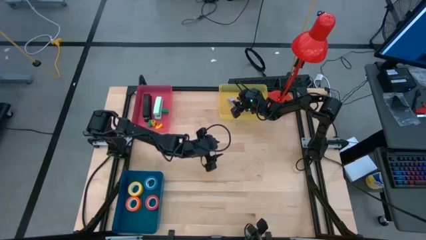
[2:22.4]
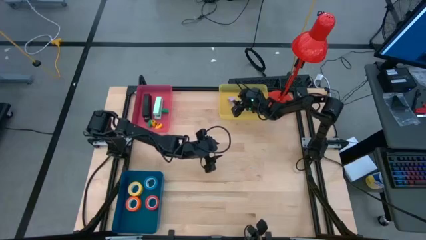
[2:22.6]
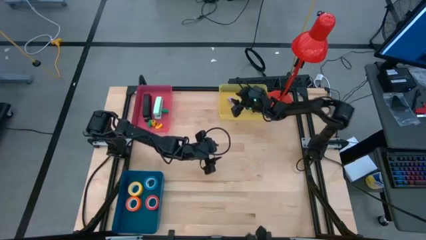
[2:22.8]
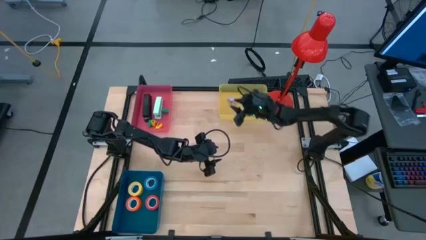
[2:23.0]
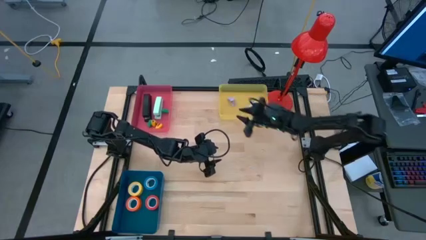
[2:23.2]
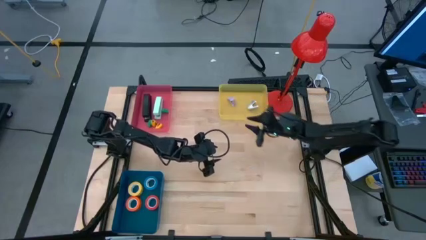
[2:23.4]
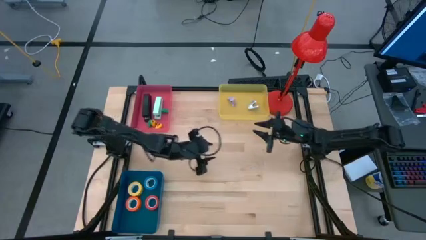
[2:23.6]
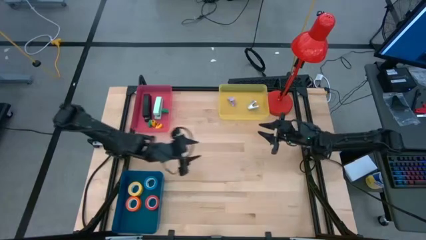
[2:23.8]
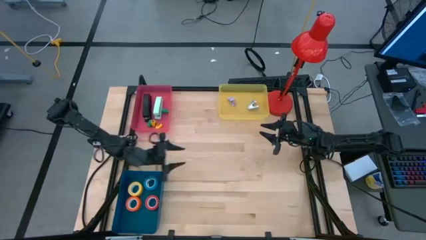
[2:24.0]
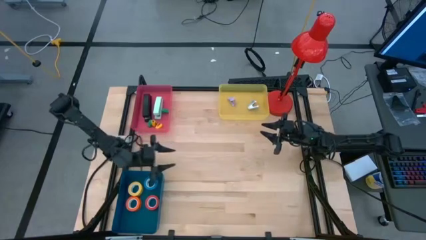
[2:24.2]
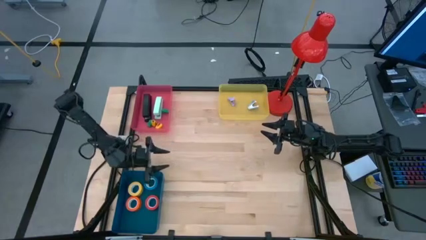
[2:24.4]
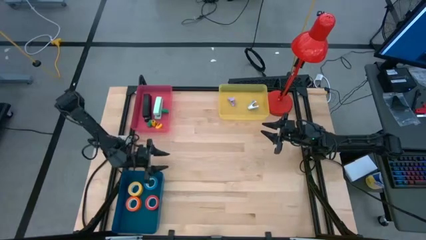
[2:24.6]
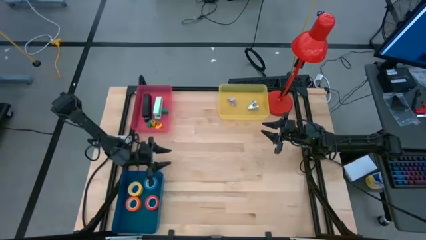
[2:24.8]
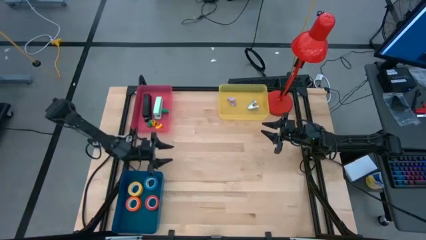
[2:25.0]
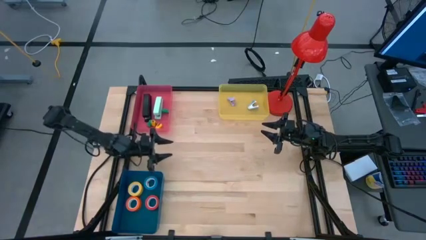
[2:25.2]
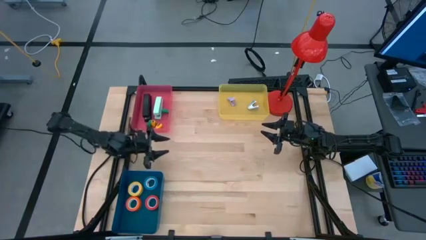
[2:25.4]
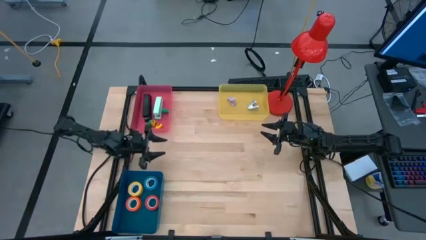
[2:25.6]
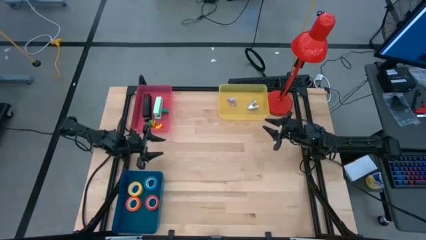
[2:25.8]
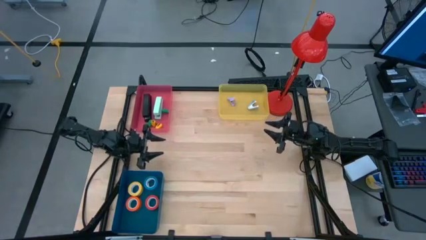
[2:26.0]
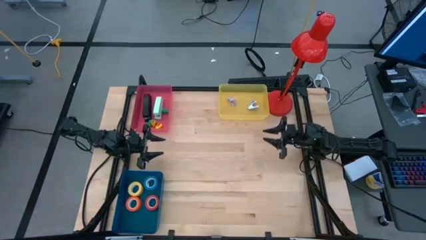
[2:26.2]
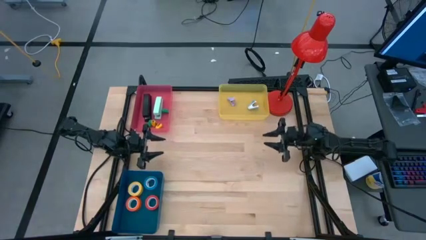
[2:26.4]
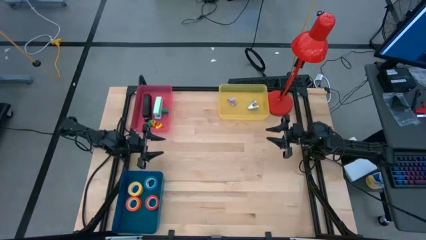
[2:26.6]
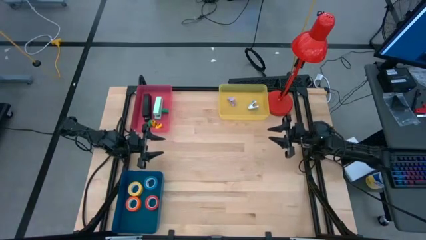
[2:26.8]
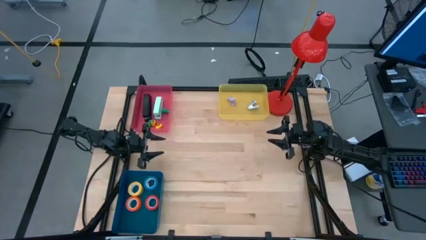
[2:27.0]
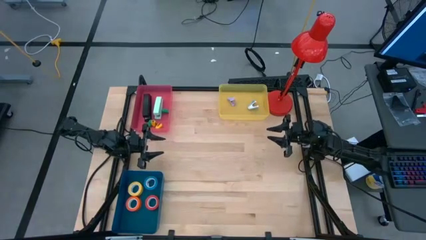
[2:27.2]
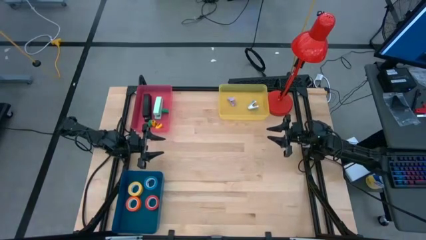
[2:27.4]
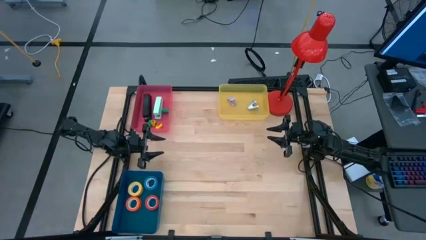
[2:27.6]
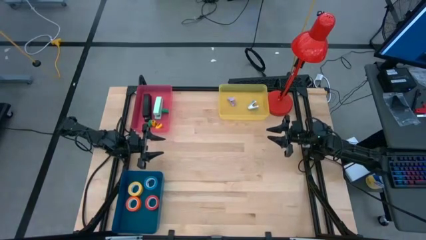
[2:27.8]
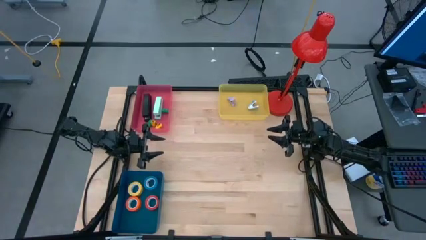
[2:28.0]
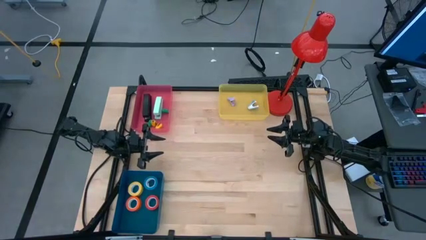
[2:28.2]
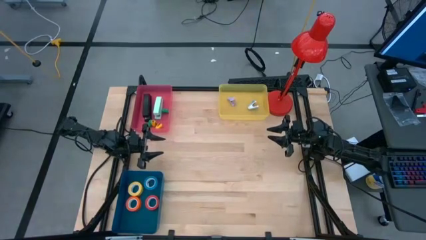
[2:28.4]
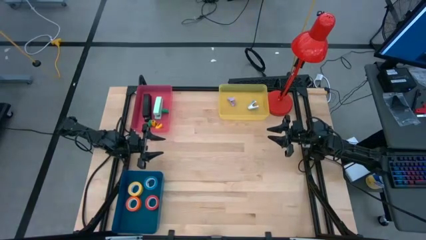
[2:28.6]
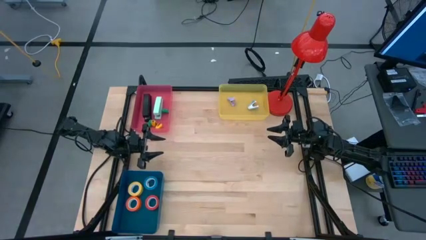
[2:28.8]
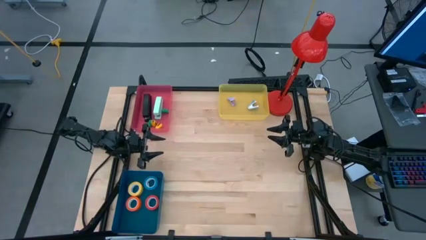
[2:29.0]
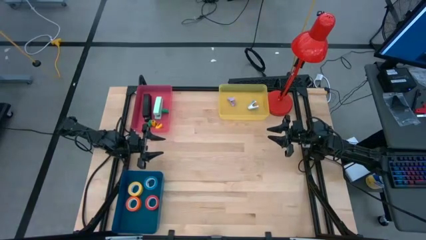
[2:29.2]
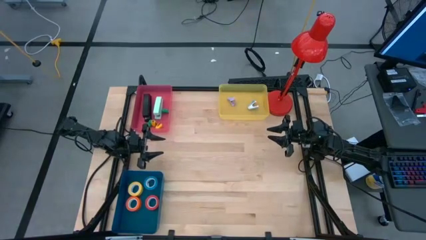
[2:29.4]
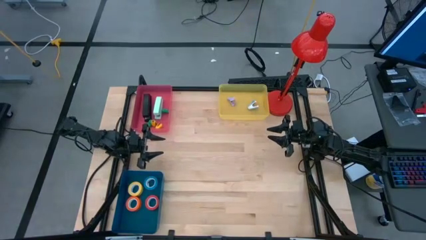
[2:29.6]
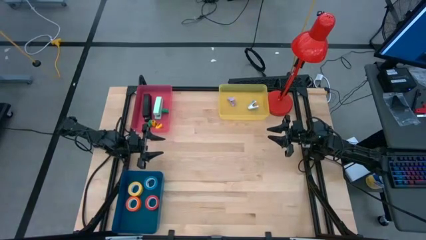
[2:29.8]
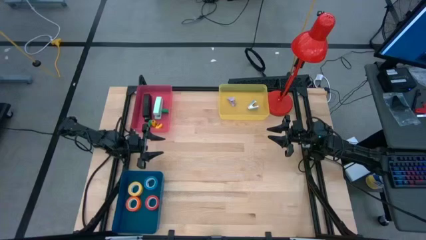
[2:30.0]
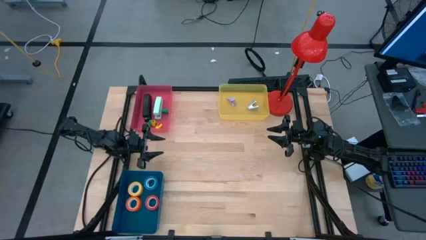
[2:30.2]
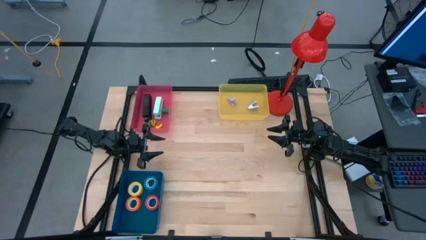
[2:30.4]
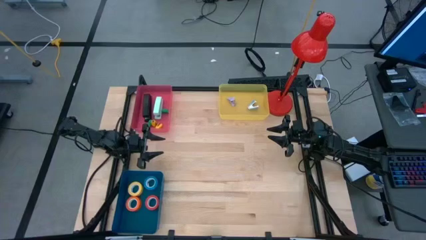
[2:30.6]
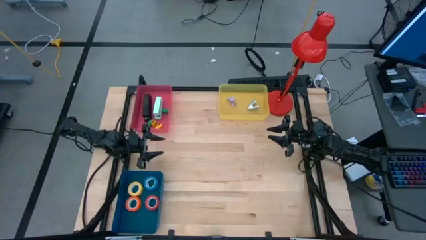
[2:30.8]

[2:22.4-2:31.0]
Task: Pick and place Stapler, Stapler remover, tape
Return to Home Position
